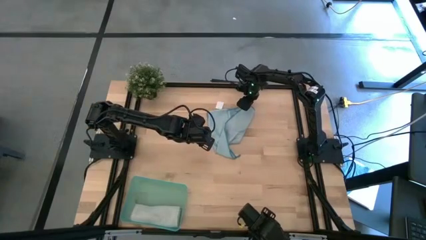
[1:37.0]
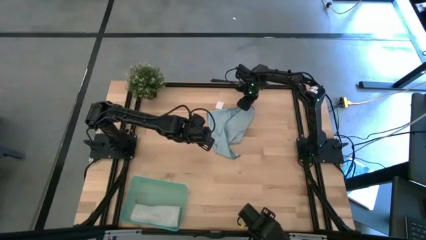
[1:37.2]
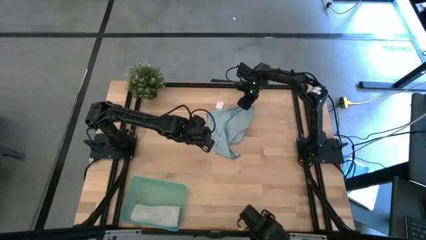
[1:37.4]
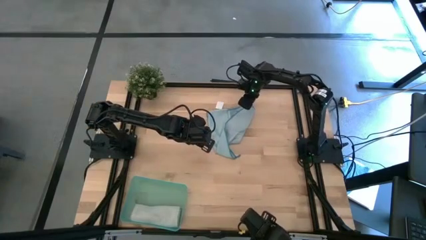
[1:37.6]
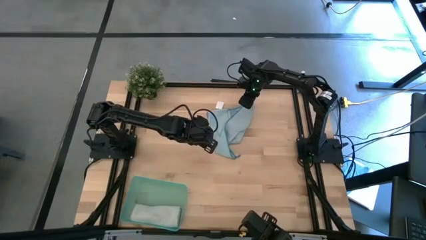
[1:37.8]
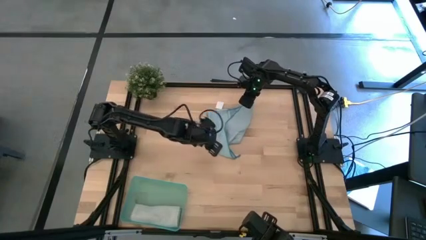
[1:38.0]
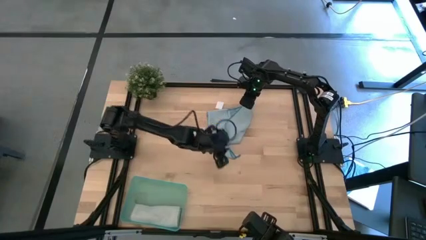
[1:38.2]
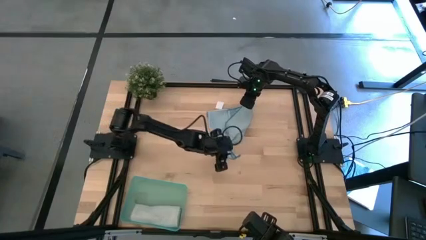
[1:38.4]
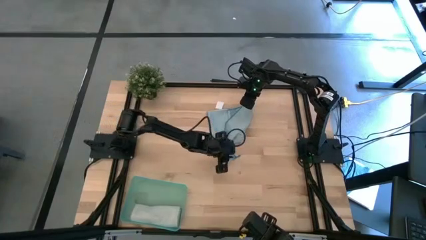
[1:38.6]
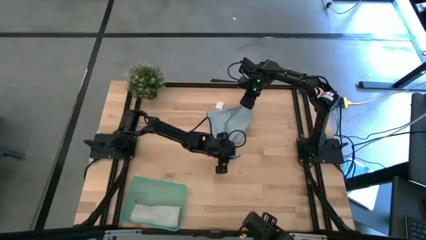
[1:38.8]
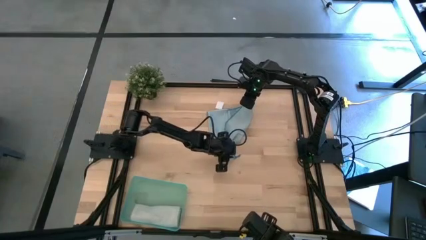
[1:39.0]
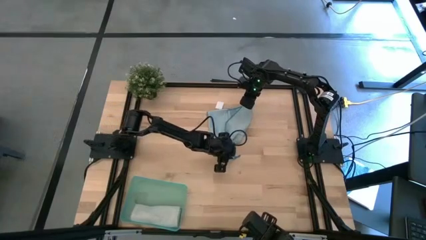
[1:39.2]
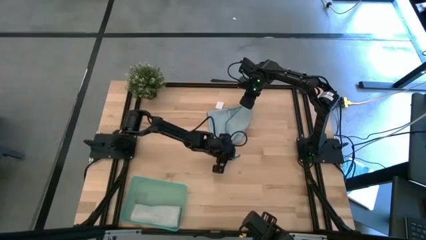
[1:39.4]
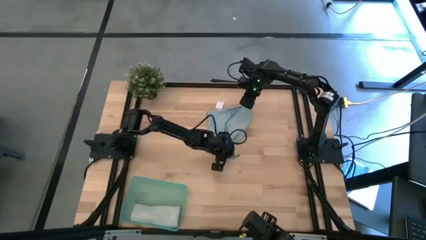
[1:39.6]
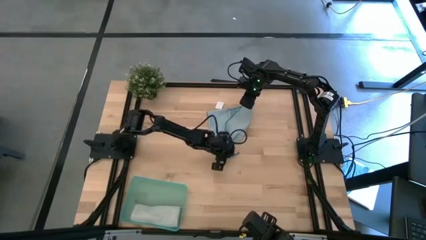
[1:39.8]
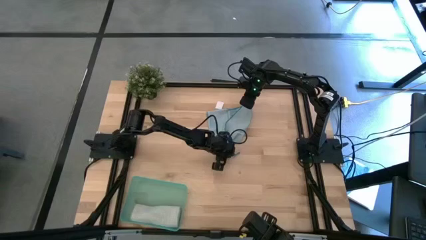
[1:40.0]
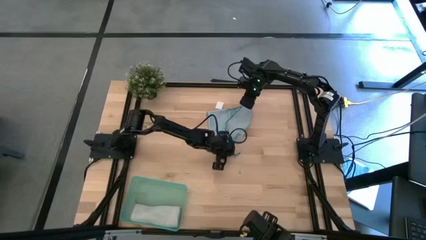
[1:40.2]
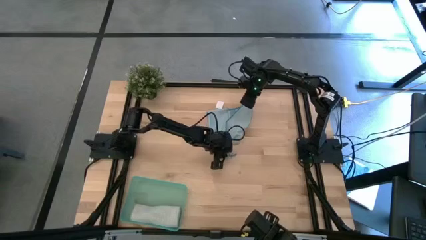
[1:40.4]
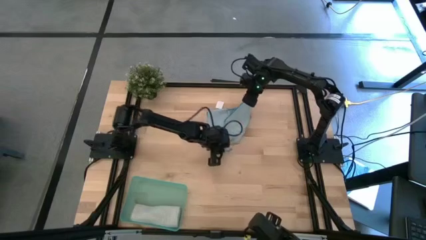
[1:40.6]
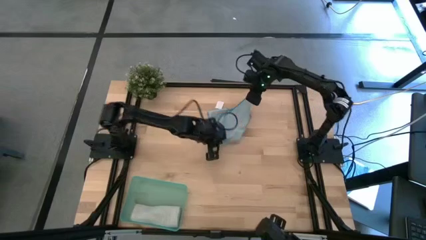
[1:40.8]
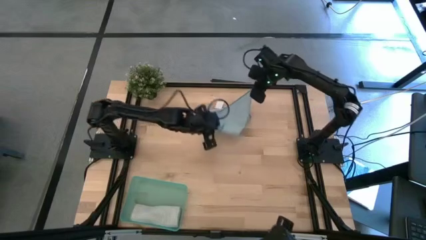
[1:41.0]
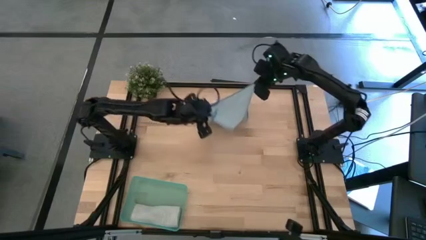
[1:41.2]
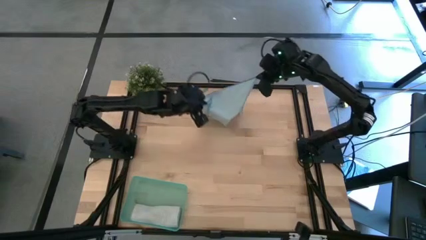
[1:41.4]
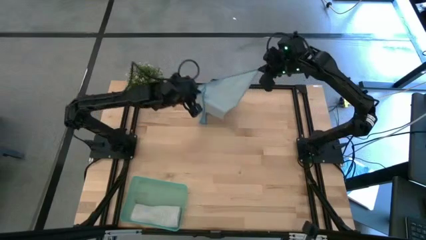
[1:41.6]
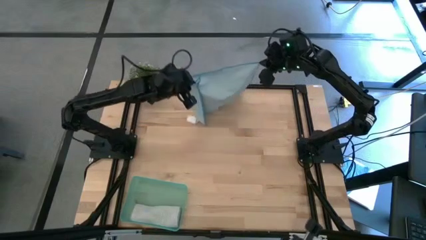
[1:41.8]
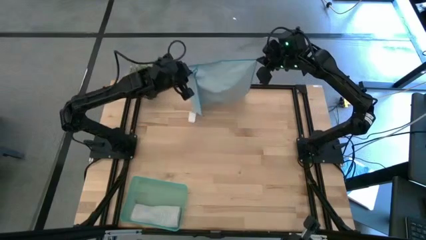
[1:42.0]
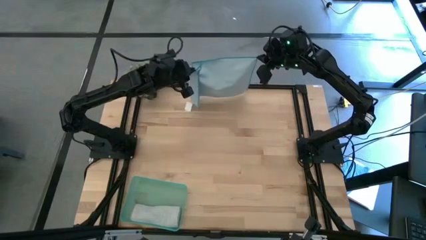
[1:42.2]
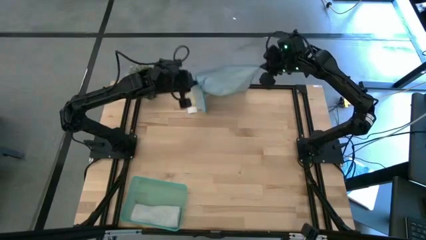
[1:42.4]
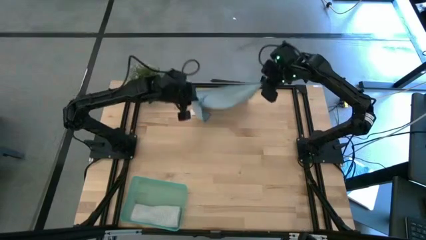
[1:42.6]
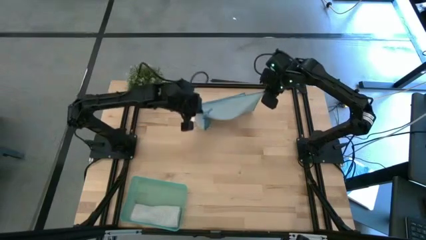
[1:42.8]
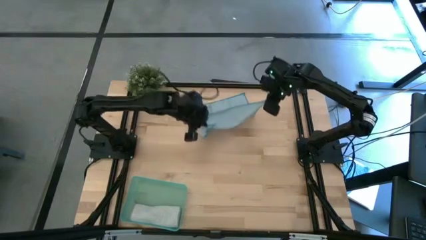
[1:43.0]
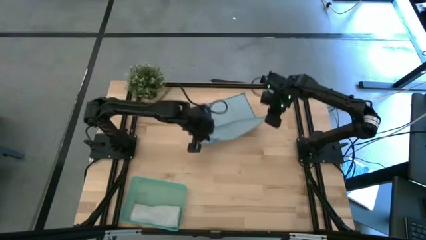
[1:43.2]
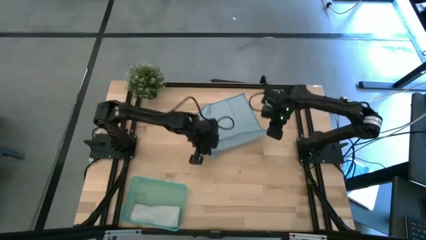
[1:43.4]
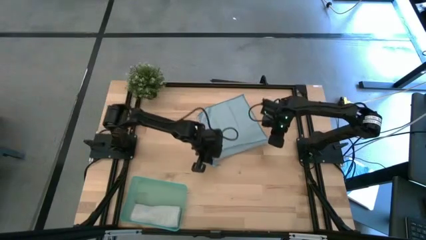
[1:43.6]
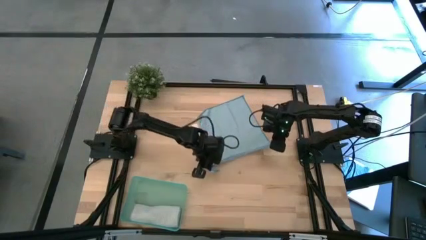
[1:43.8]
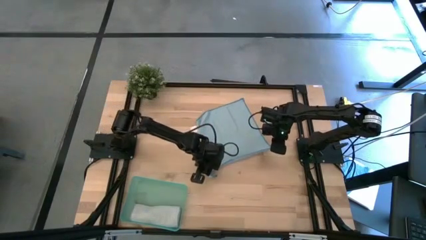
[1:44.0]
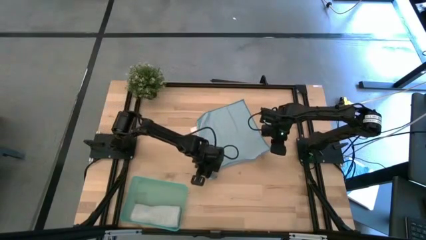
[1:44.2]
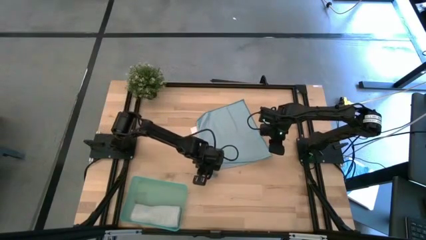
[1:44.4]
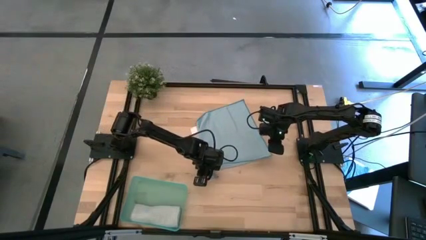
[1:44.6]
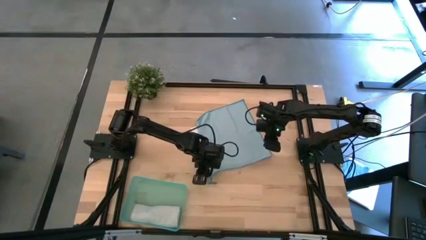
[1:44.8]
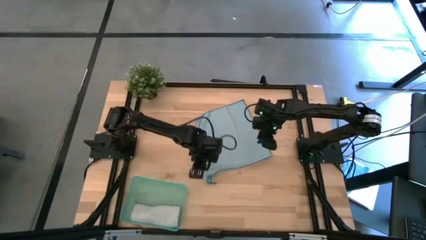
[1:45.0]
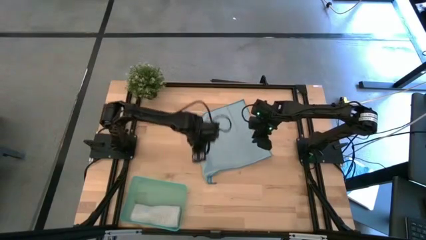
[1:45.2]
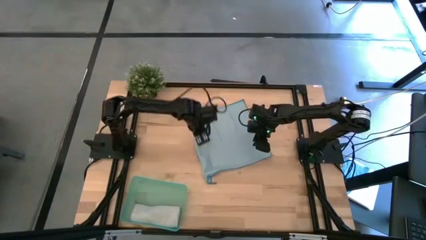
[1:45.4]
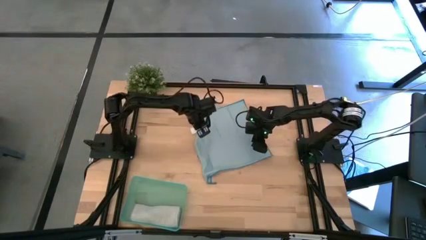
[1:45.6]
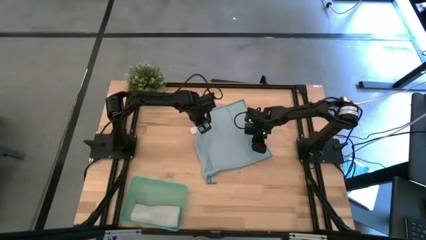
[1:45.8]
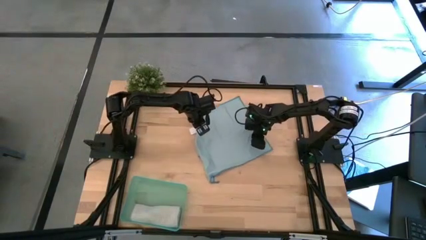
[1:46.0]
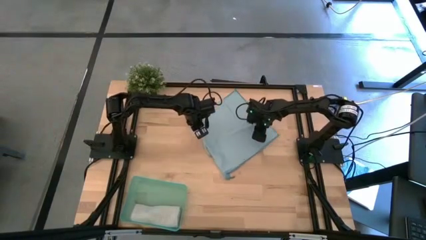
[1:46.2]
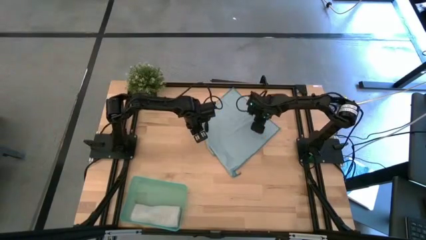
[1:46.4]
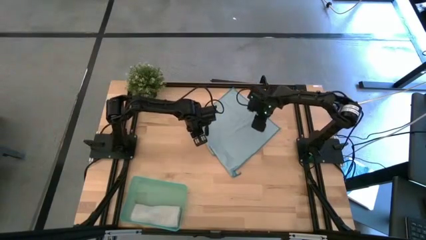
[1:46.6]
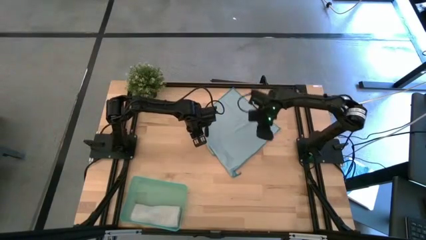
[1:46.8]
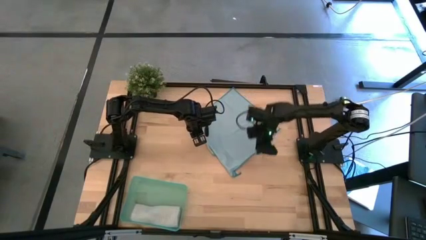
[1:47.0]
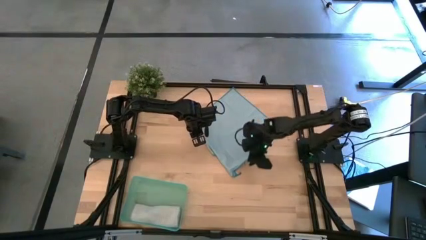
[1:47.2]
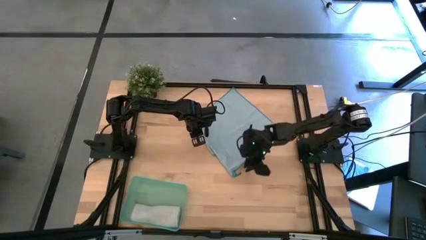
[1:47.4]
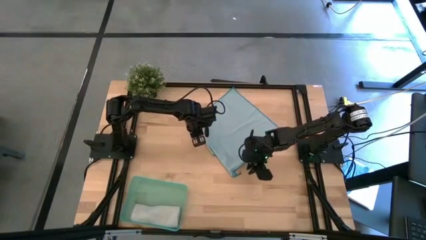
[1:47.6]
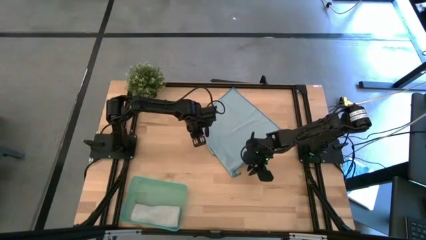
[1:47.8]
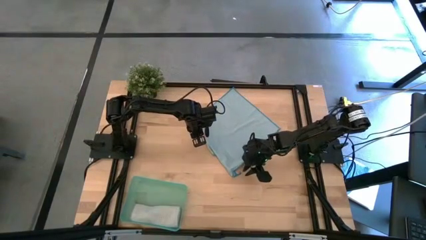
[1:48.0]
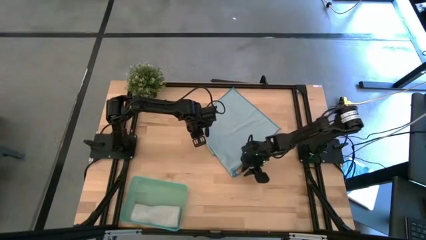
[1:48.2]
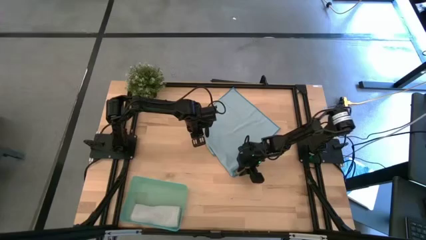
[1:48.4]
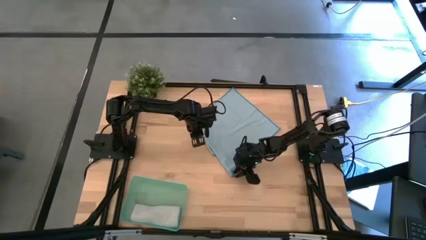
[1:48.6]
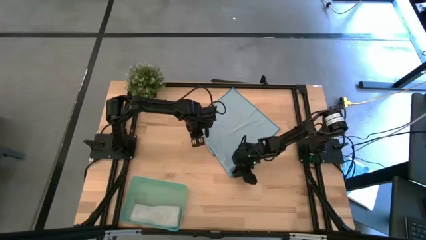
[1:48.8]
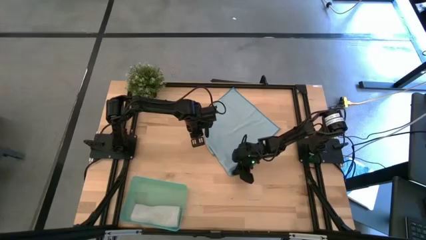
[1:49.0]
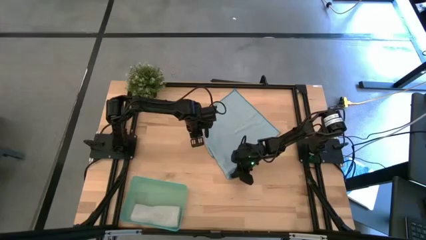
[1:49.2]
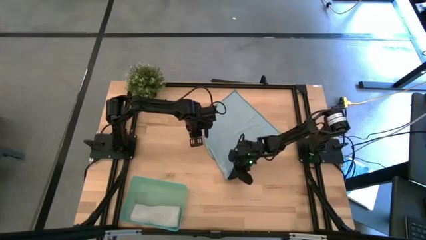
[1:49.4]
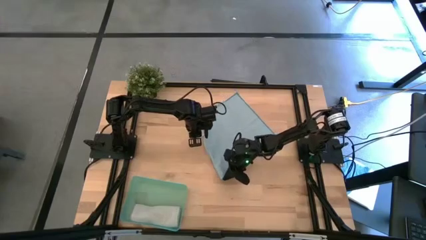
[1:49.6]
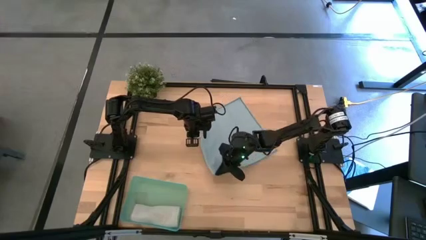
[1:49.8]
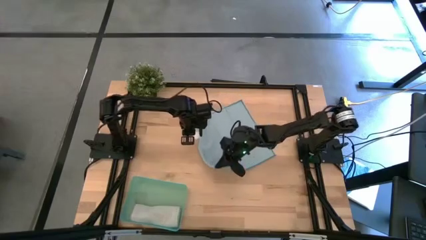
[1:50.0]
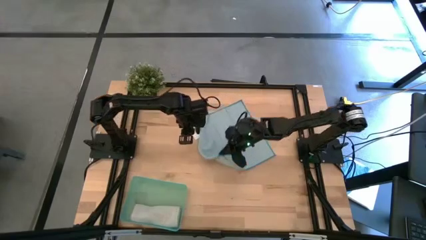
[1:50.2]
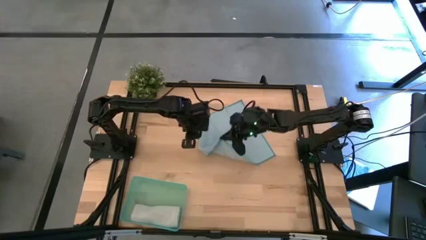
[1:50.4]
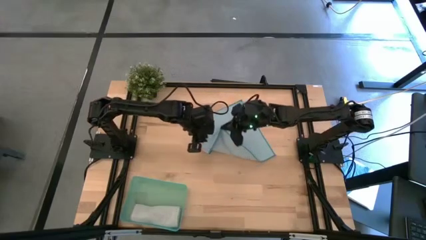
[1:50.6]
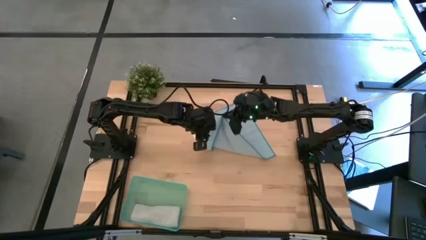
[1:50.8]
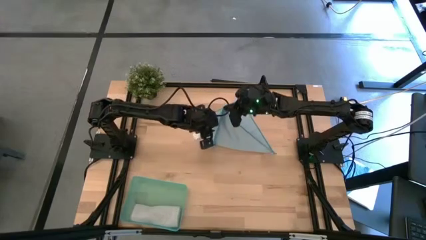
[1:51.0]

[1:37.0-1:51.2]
Task: Roll microfiber towels into tight, uniform cylinder then place into a basket
Roll the blue microfiber cloth
